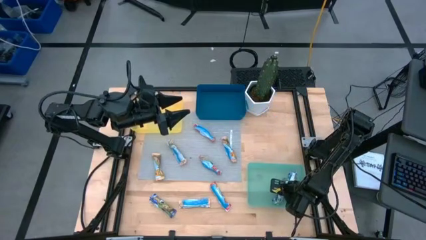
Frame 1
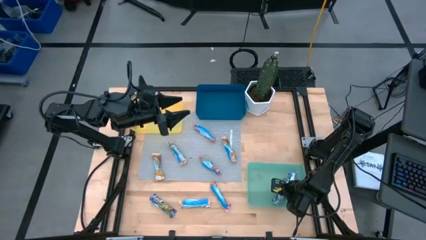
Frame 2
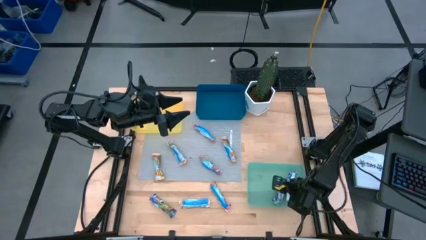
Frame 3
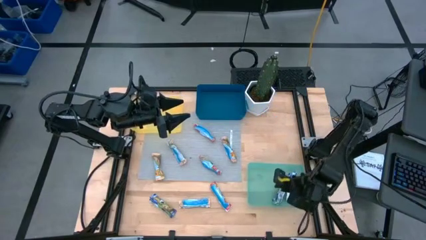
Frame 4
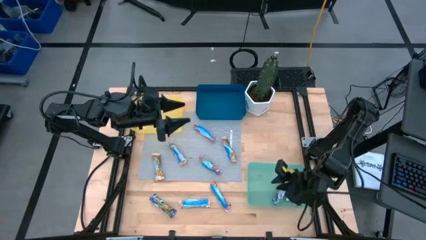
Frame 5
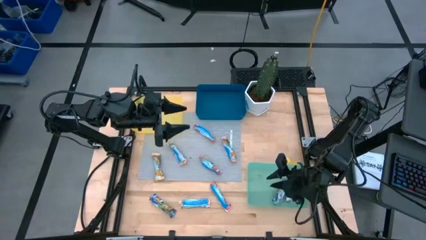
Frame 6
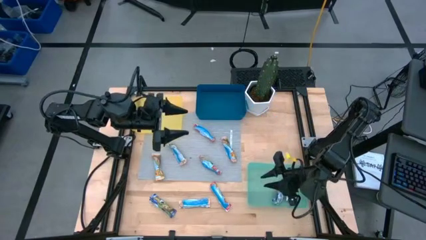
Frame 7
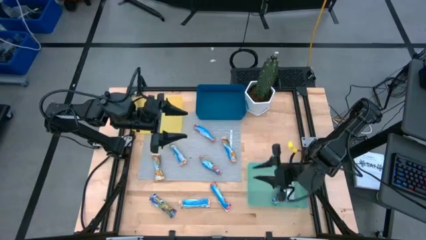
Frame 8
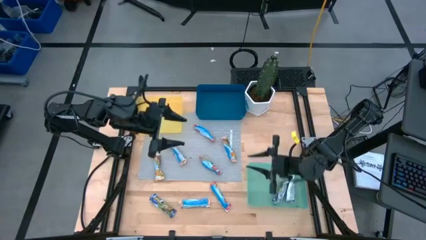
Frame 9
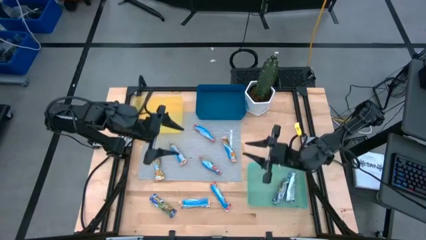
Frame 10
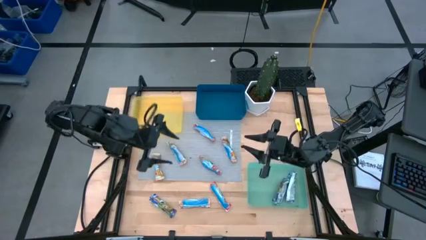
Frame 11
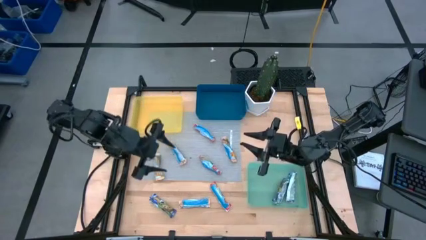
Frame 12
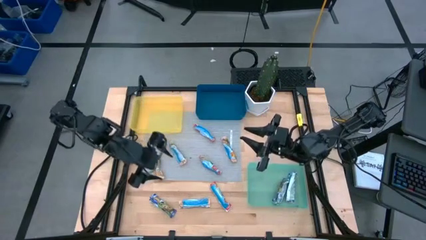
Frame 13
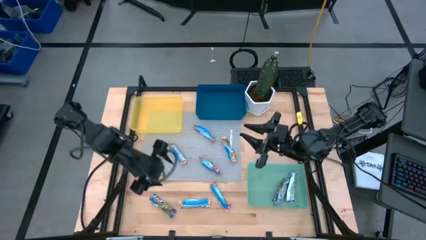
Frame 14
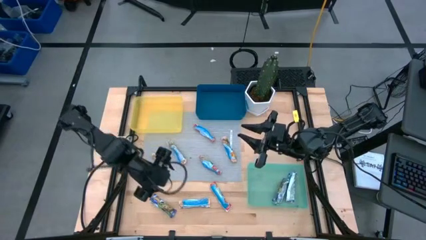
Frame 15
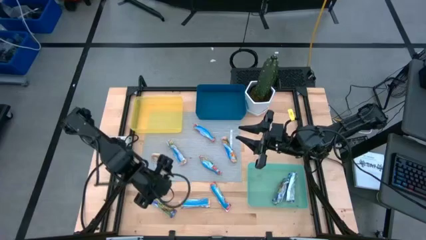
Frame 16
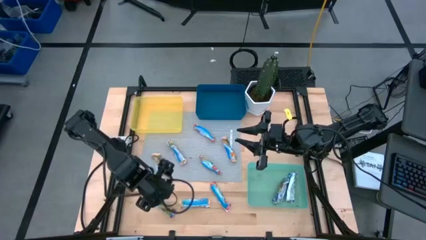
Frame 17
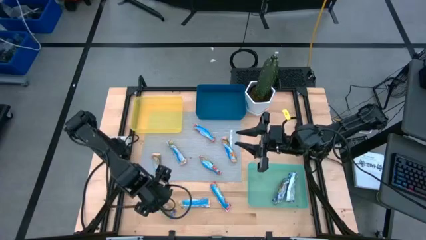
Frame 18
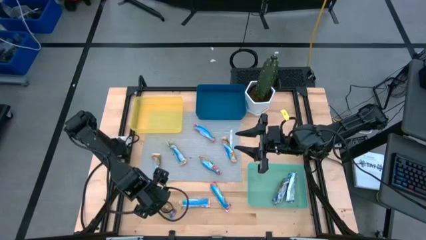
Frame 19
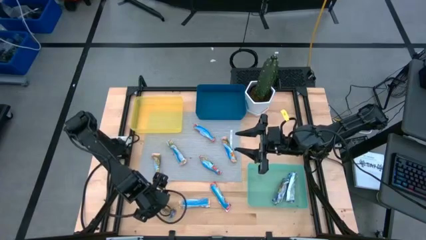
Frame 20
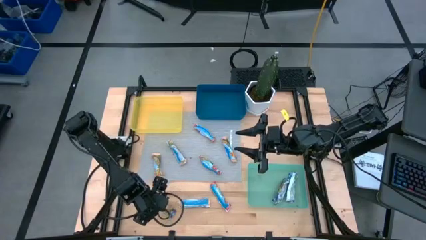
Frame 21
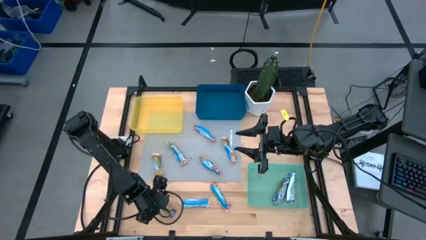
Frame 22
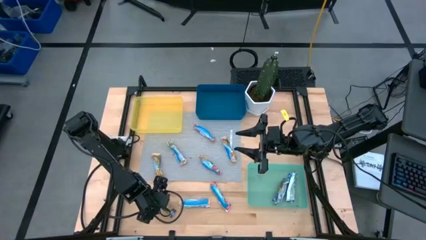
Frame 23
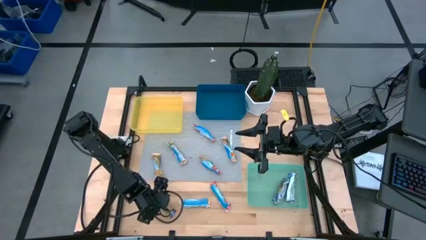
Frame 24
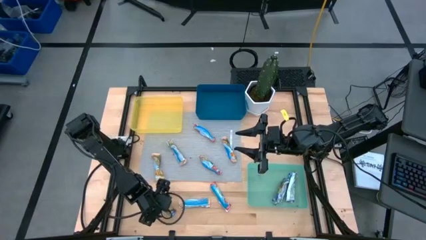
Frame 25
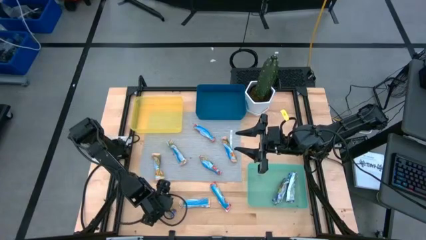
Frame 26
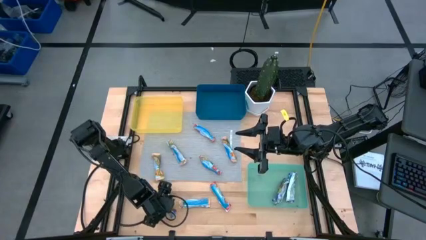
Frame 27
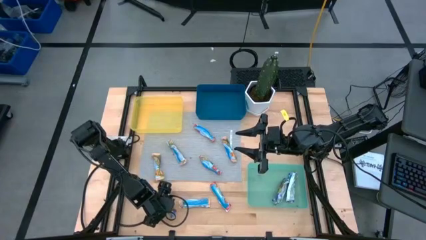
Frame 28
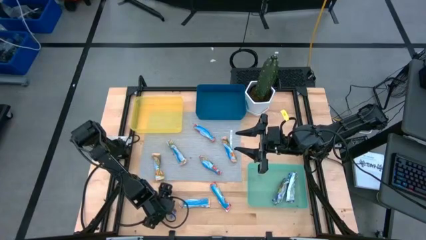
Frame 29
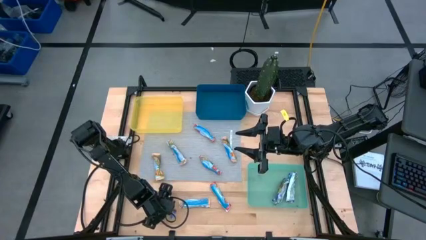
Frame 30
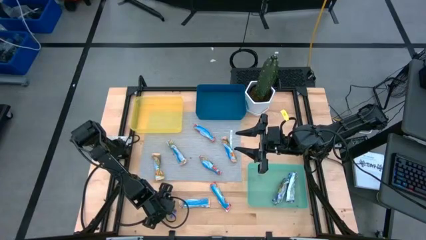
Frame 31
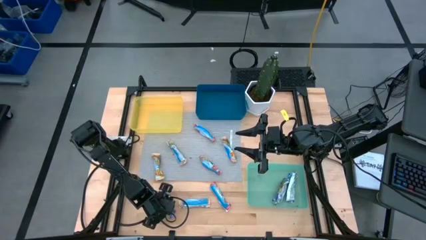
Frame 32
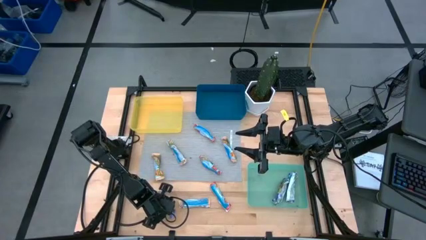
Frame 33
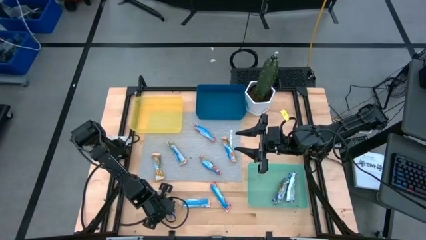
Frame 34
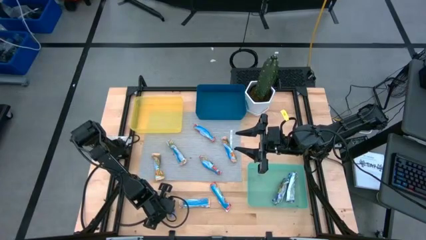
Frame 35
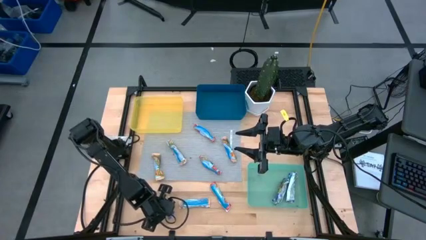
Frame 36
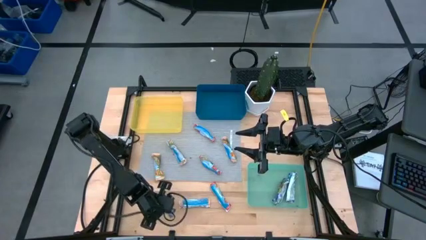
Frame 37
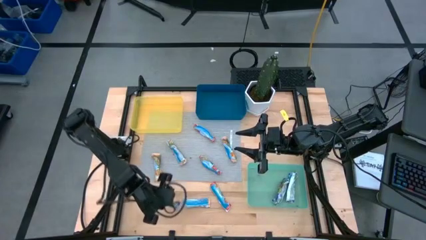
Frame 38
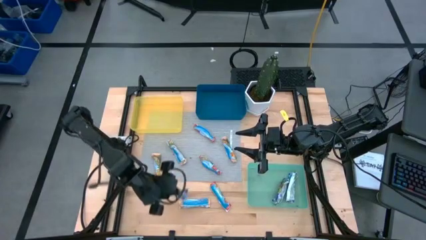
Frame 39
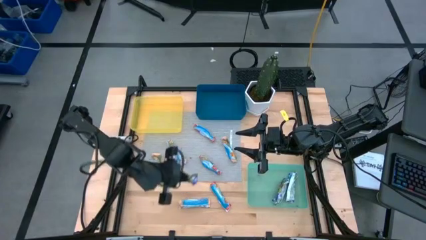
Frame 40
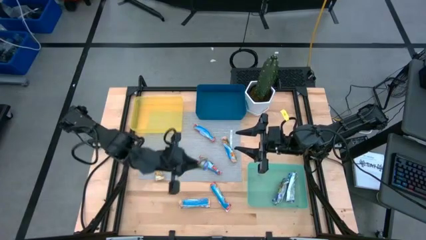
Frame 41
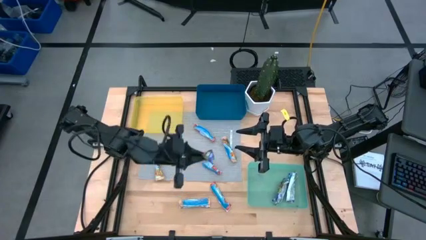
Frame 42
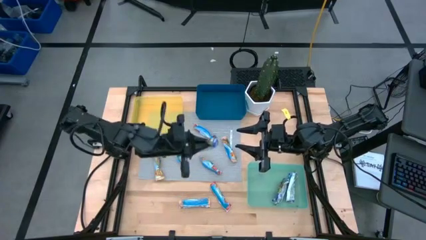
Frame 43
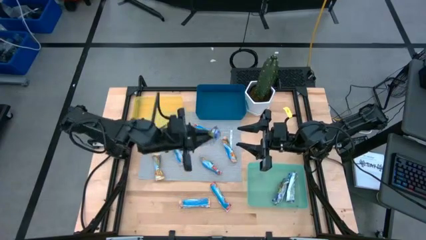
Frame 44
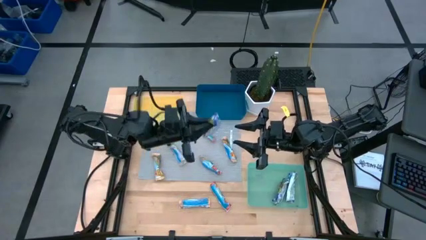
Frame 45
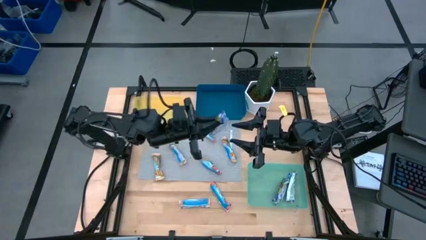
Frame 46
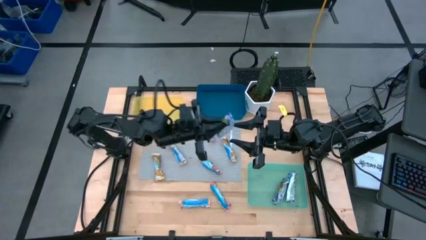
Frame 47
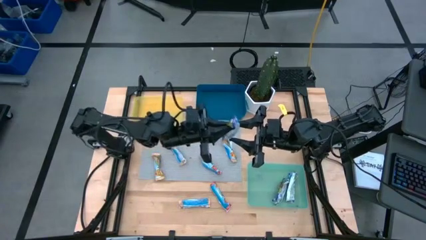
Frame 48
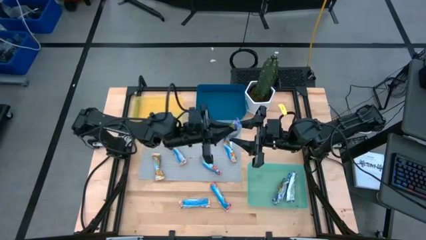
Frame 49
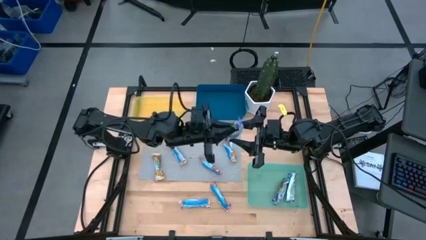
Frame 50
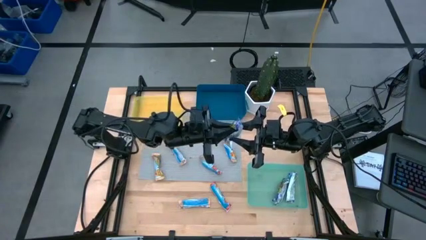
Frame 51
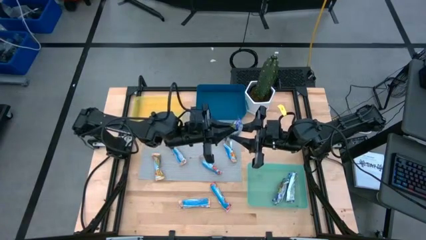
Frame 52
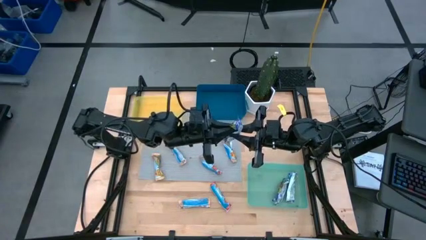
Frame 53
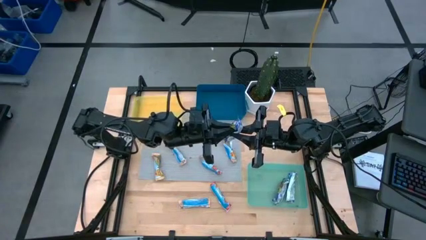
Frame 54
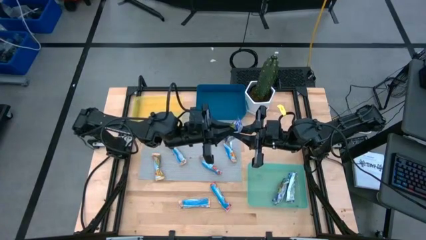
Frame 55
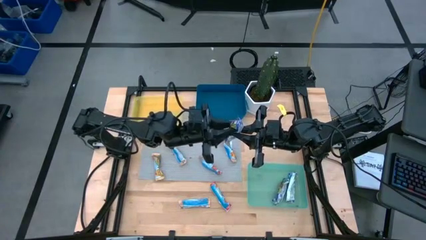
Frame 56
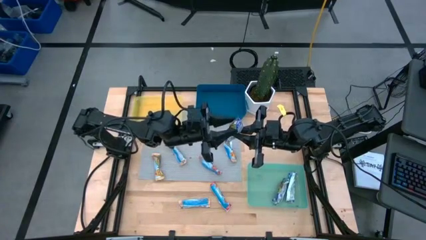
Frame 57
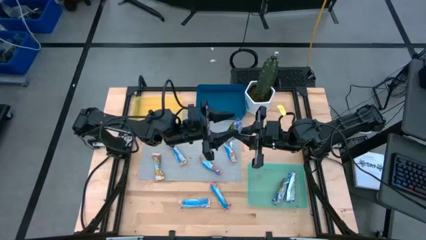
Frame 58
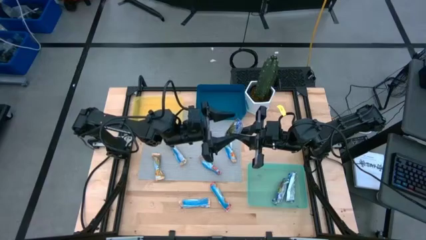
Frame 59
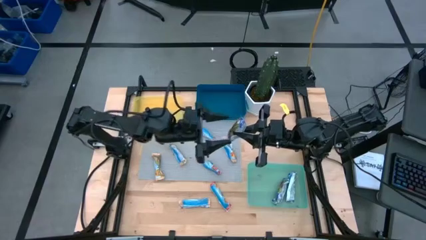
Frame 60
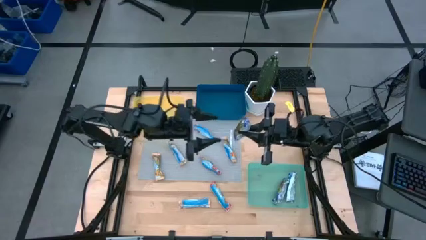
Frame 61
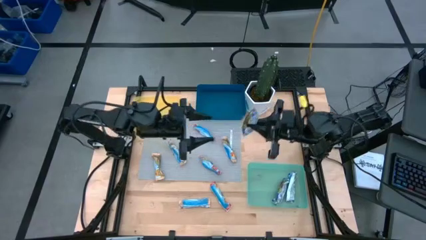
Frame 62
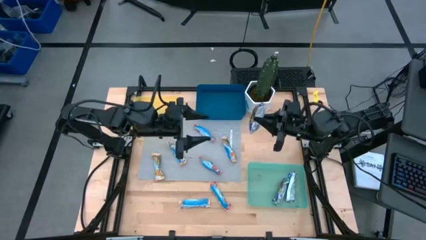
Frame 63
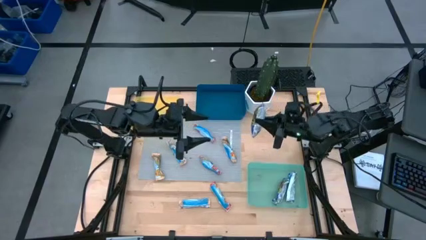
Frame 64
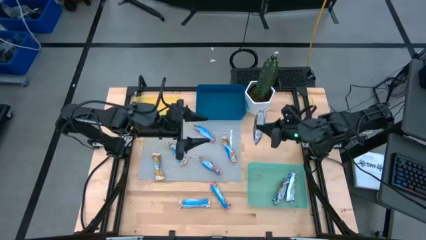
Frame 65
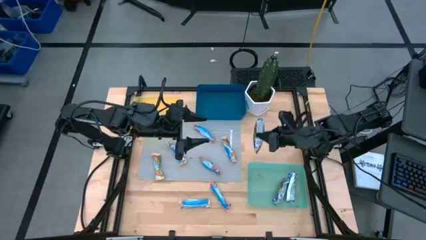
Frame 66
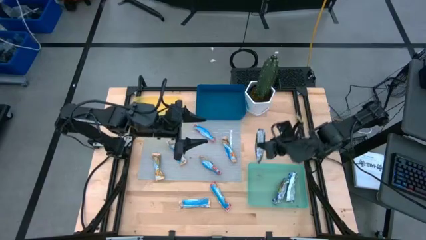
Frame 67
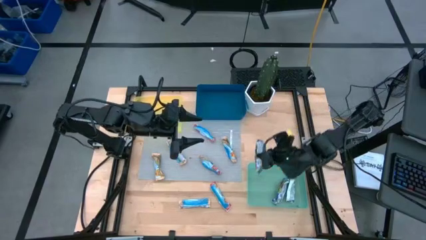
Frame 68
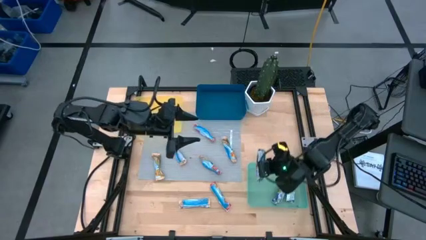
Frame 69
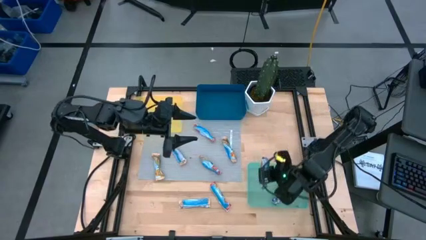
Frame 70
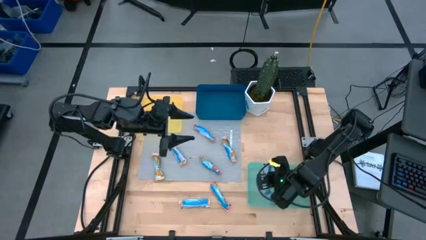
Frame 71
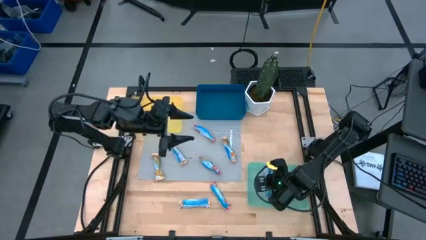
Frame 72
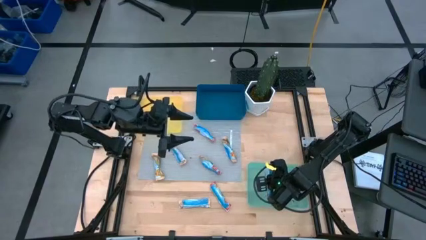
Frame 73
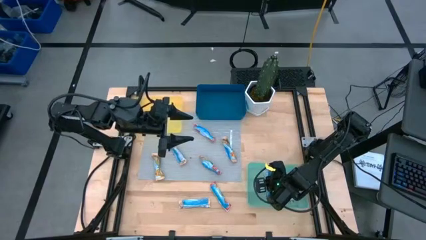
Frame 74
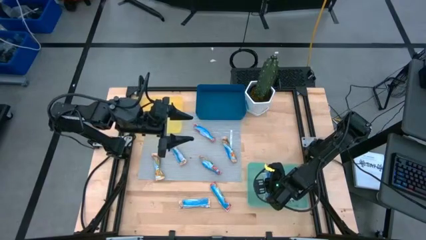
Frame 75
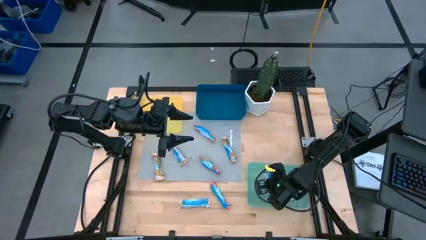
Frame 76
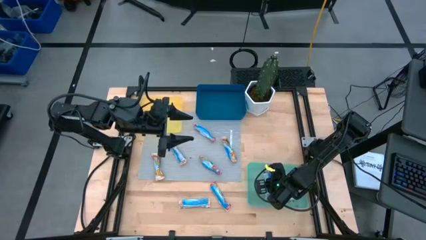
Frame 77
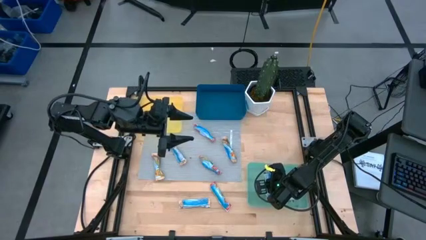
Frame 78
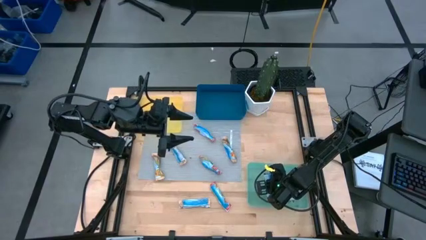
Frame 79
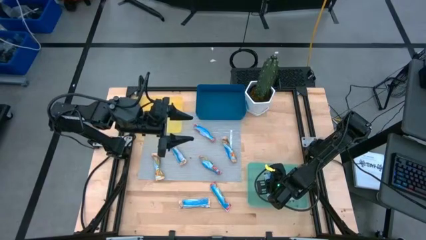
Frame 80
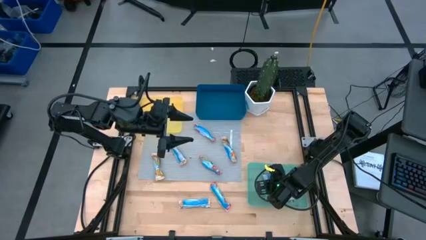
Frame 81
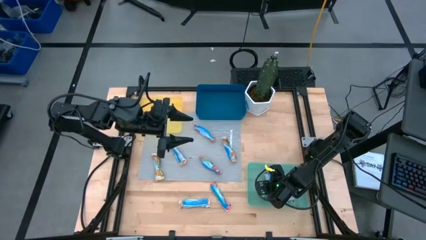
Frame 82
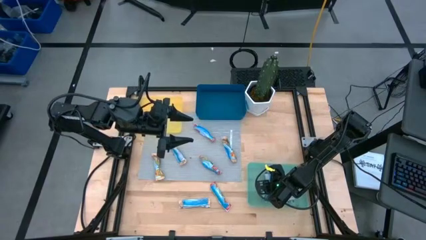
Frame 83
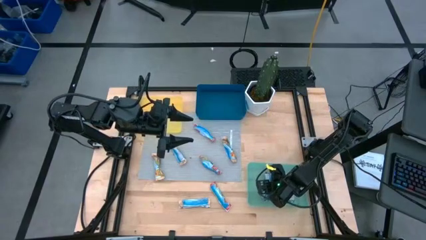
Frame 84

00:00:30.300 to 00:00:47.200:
Task: Pick and place Granola Bars by type
Put the blue granola bar into the green bin
